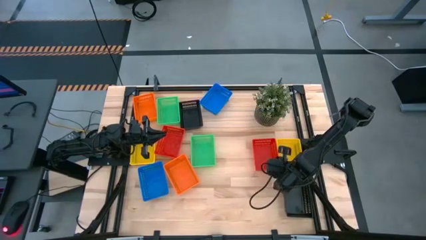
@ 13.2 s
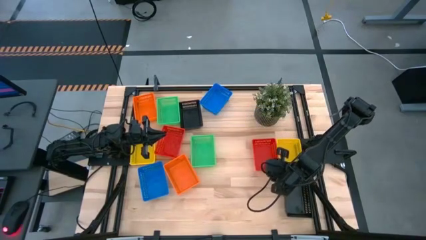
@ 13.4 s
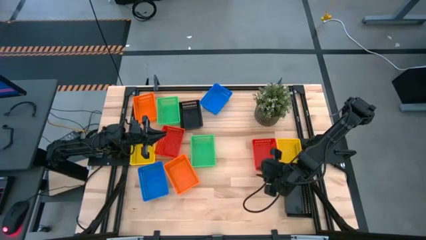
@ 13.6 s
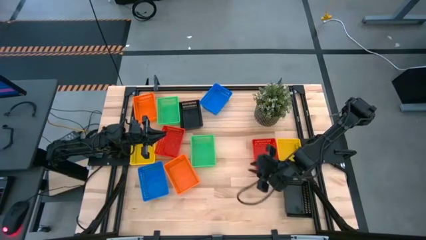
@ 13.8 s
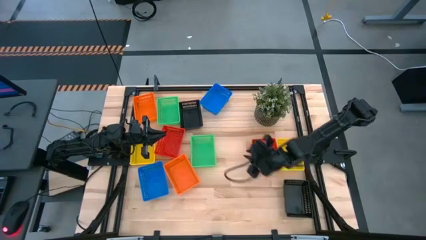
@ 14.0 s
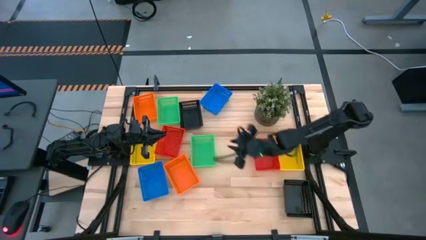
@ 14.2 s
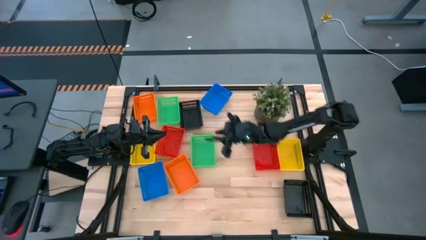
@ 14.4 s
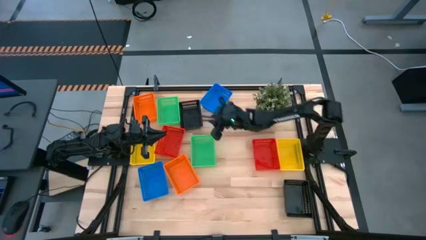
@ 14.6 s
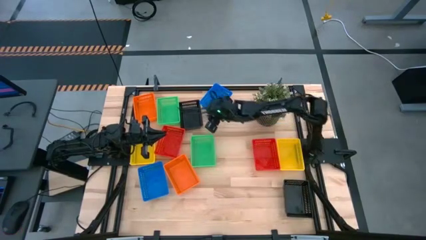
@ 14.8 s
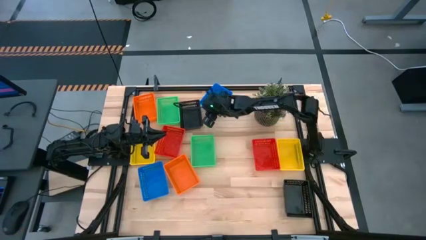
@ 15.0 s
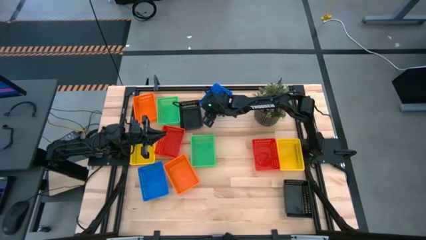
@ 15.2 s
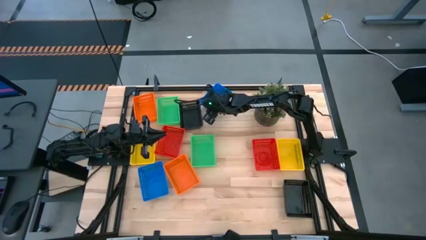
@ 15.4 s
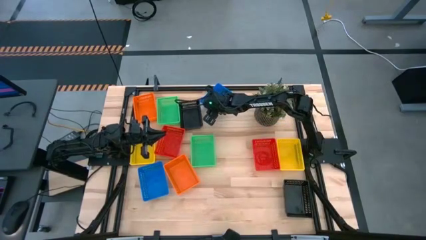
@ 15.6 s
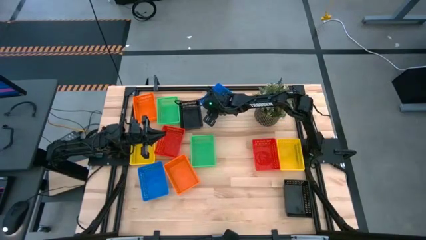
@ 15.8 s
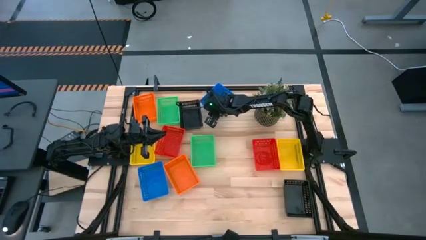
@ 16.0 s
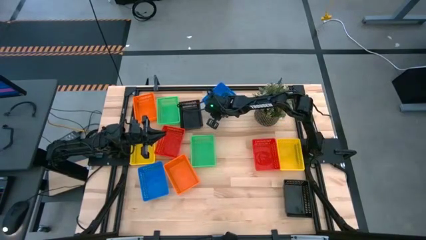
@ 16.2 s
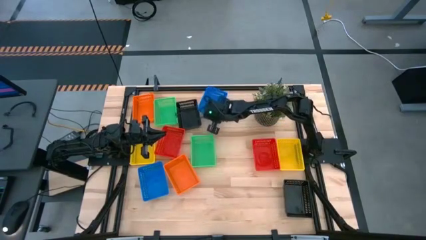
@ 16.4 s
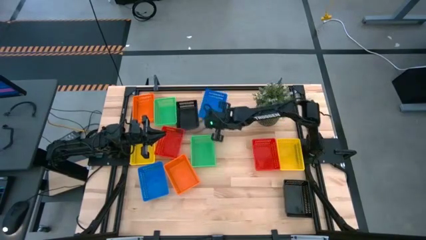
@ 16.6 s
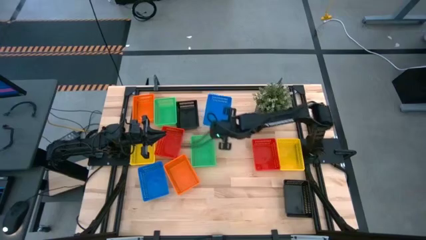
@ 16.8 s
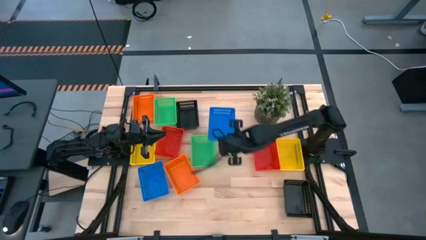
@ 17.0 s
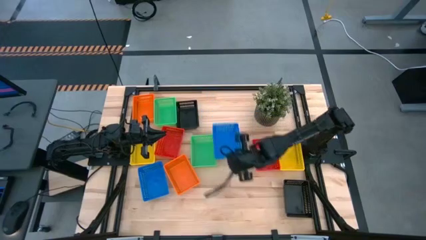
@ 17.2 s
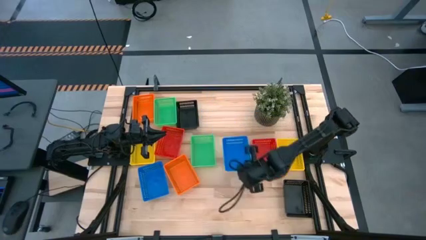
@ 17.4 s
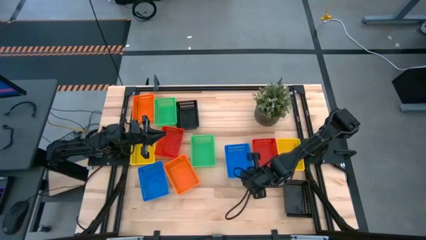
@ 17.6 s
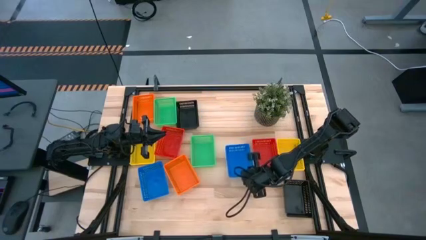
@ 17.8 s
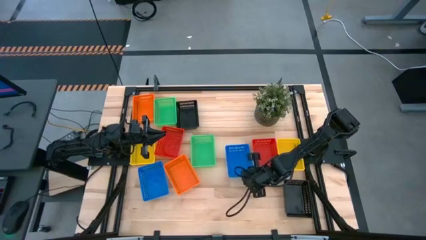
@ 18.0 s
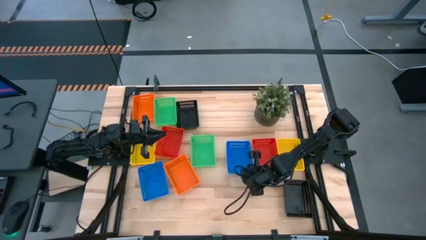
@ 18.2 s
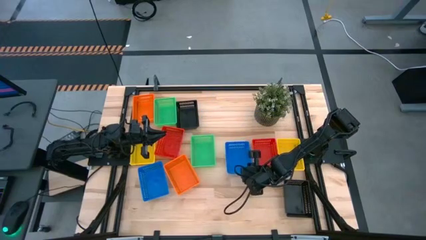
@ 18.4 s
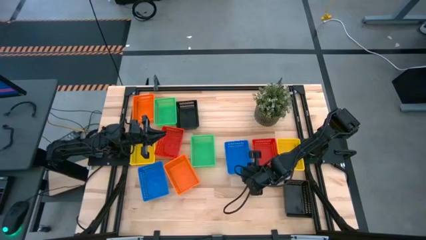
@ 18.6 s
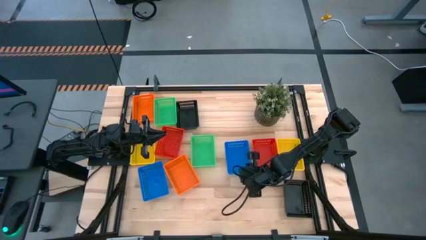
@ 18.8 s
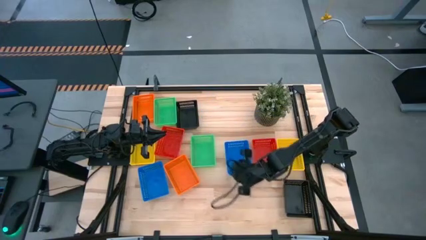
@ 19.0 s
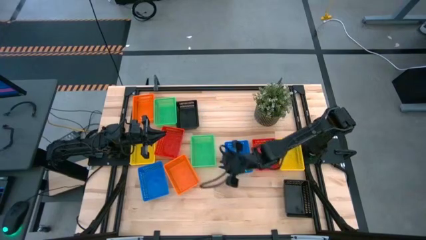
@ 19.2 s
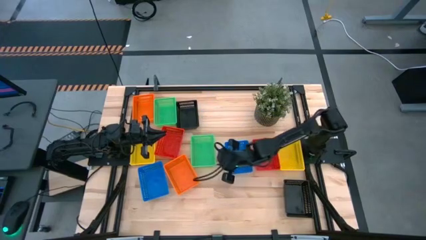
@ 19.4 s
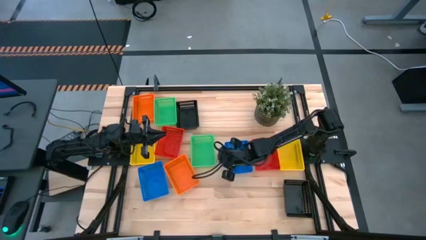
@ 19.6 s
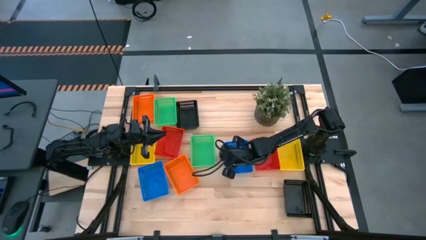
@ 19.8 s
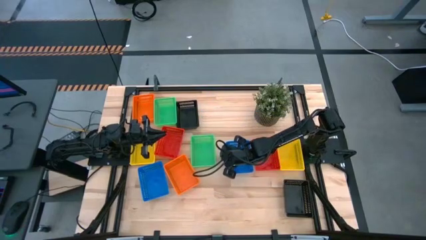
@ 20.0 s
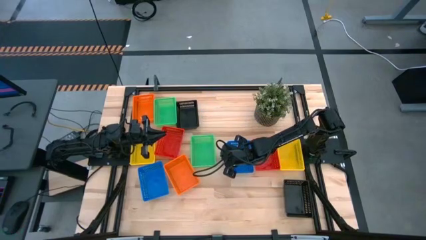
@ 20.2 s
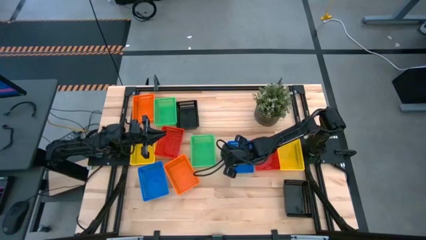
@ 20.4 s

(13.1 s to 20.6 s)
Move the top blue bin beside the red bin to the centre of the table

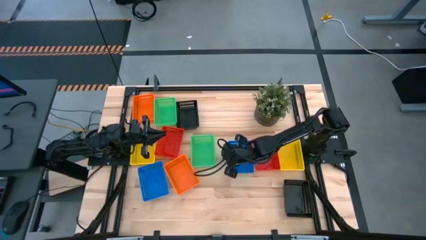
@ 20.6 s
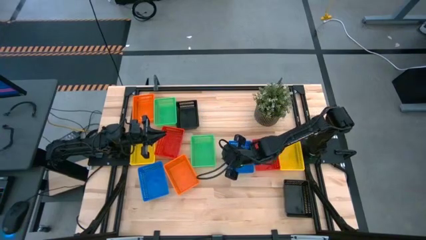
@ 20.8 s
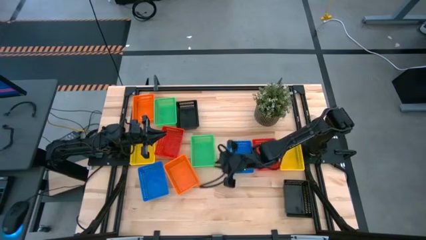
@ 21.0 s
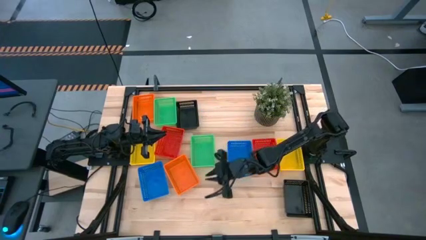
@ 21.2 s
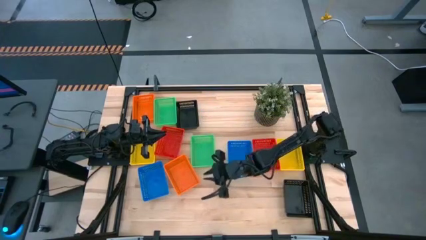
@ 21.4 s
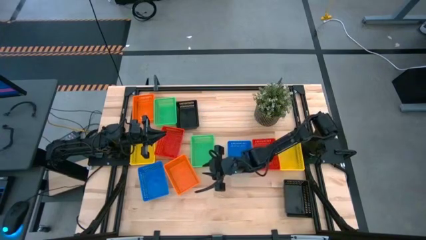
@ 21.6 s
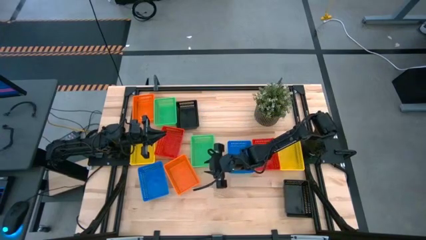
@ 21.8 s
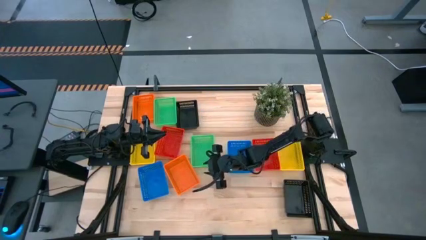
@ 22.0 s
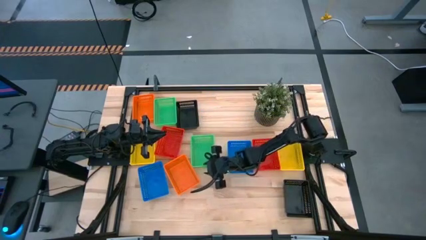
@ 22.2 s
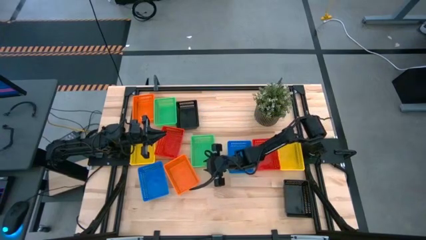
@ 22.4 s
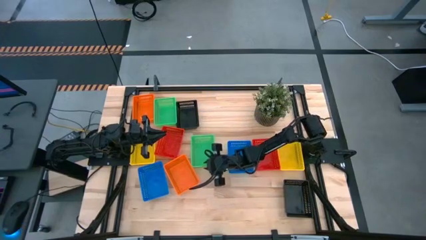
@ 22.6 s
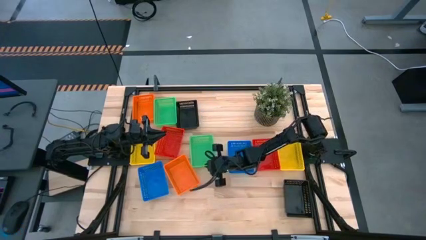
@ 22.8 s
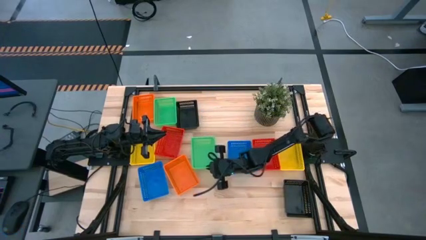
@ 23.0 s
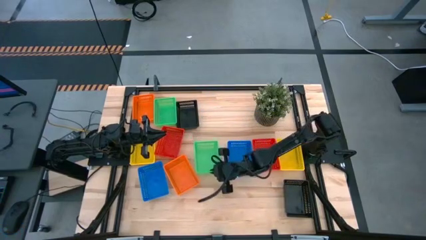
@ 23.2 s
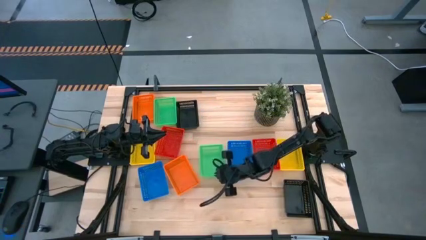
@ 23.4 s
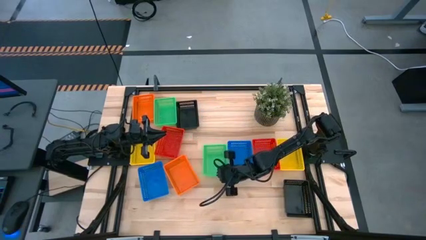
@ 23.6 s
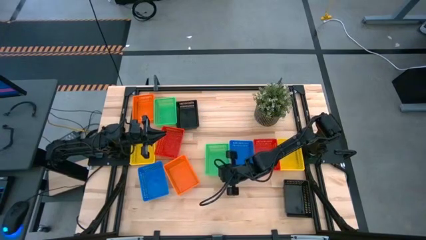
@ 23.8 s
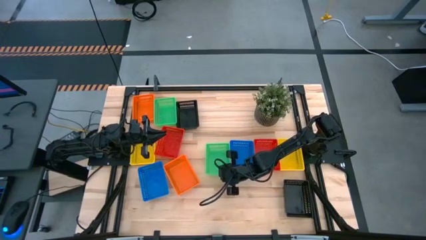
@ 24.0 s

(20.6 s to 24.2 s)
Move the bottom green bin beside the blue bin to the centre of the table

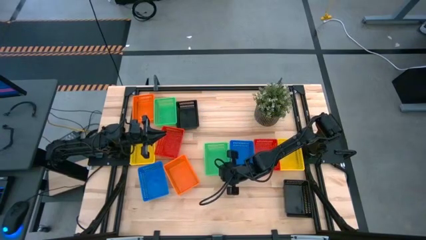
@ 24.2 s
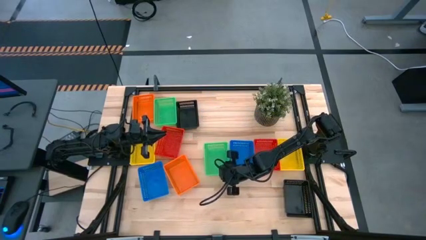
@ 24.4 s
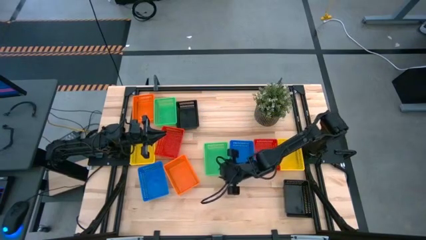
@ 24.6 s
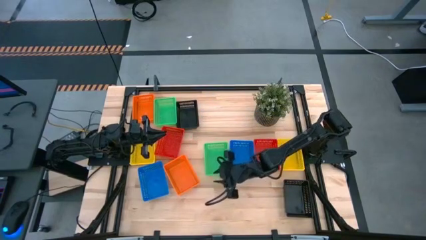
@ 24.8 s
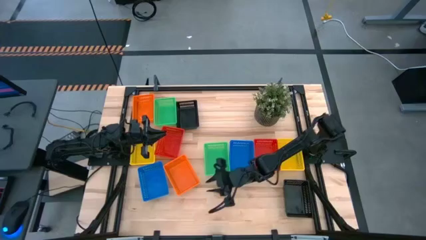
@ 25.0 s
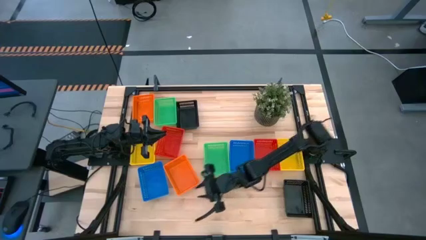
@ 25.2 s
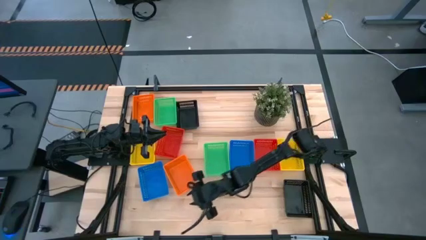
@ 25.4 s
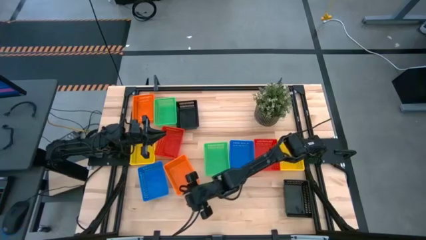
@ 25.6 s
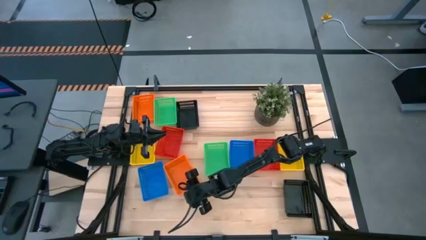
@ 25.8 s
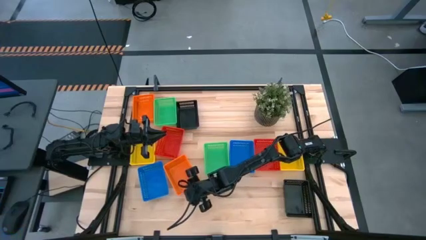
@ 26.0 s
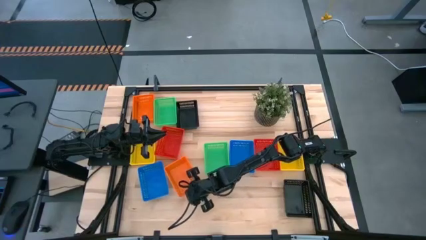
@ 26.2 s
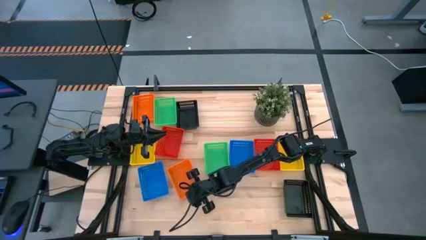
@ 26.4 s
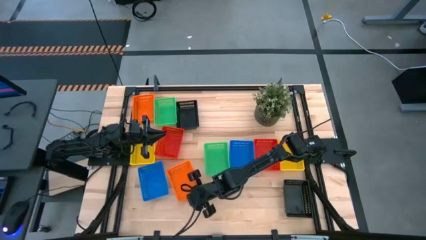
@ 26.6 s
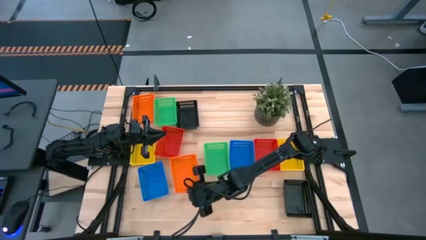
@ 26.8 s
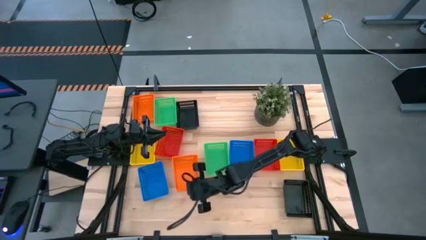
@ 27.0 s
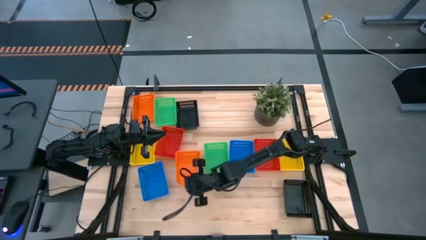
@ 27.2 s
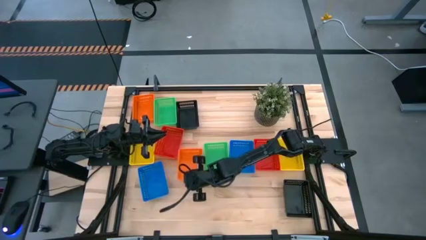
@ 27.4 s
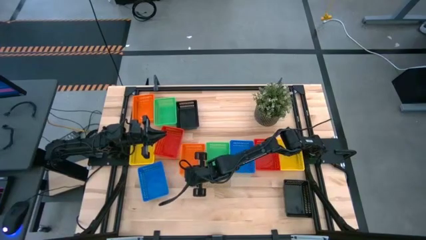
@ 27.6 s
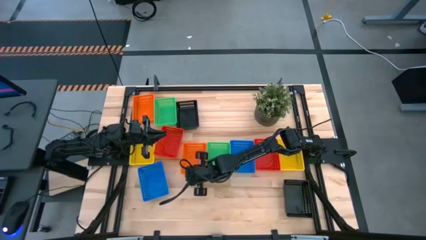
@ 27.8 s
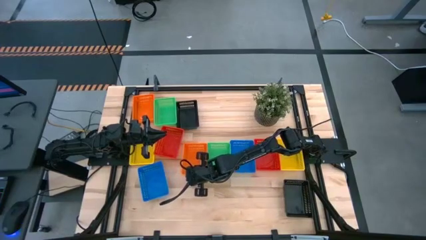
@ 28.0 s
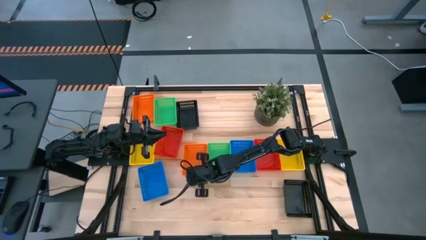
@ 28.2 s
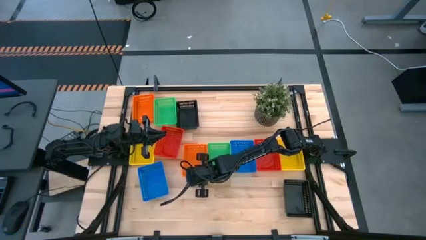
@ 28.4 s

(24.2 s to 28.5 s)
Move the bottom orange bin beside the green bin to the centre of the table
